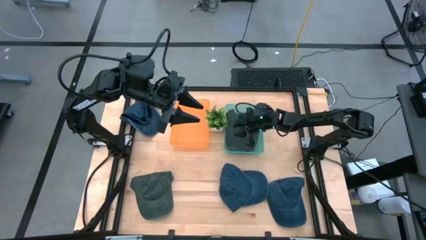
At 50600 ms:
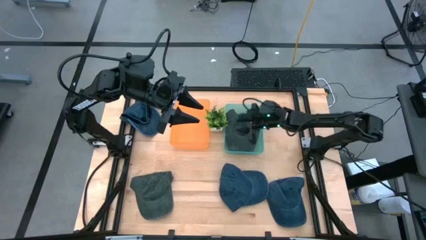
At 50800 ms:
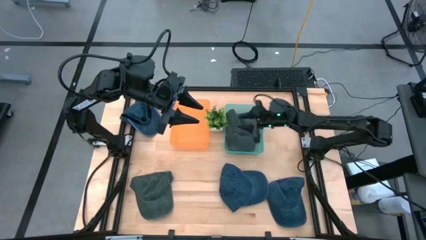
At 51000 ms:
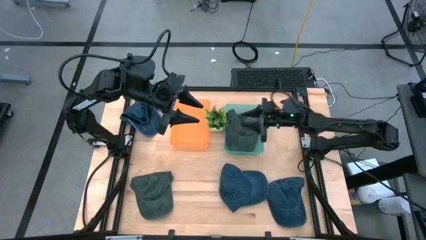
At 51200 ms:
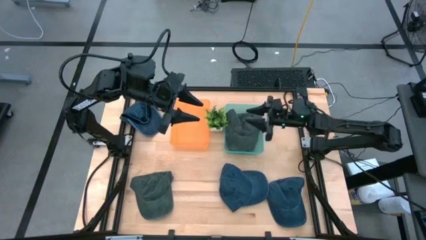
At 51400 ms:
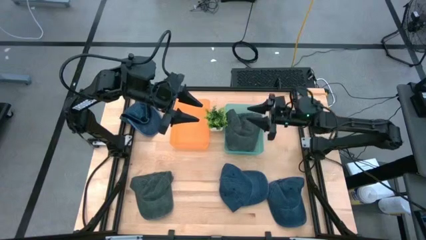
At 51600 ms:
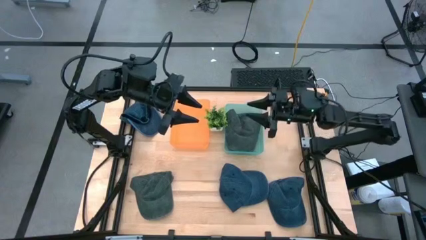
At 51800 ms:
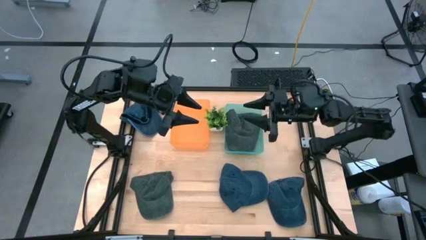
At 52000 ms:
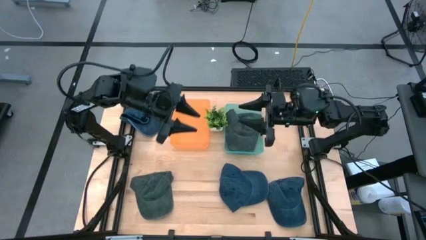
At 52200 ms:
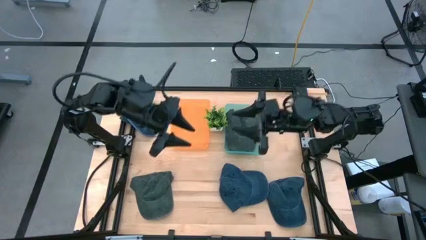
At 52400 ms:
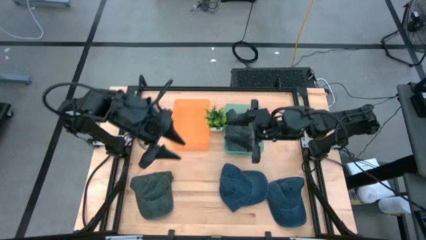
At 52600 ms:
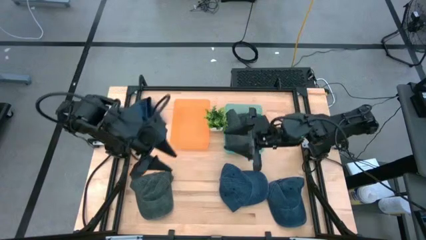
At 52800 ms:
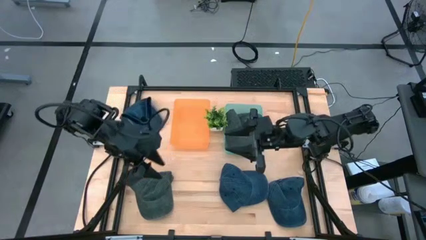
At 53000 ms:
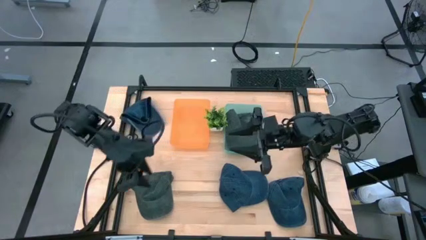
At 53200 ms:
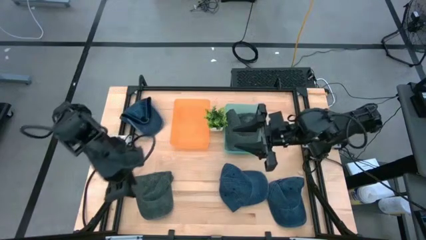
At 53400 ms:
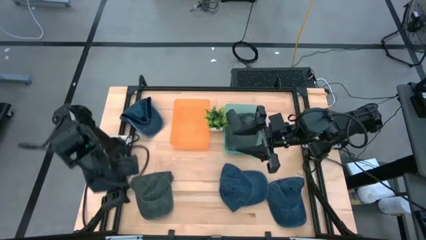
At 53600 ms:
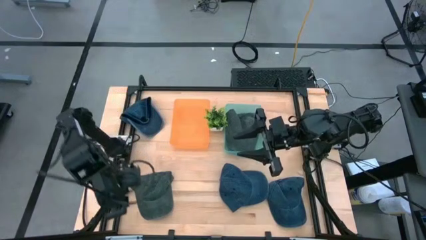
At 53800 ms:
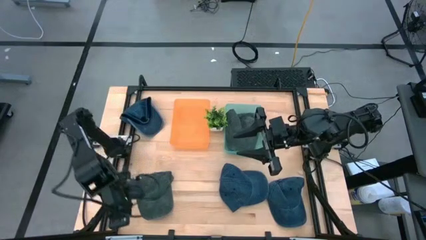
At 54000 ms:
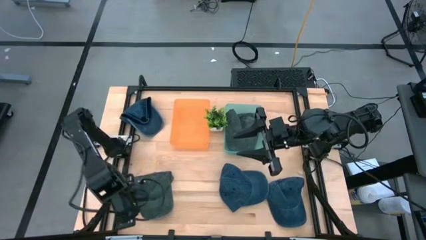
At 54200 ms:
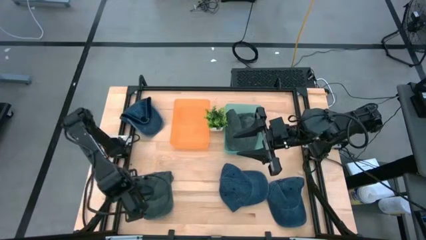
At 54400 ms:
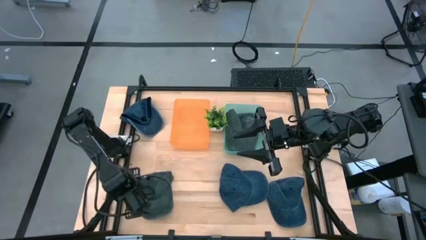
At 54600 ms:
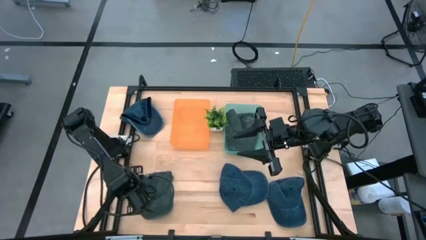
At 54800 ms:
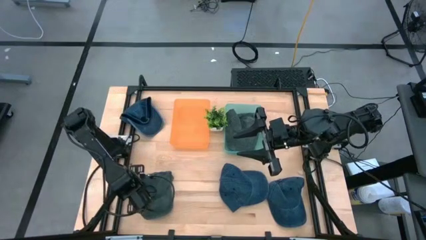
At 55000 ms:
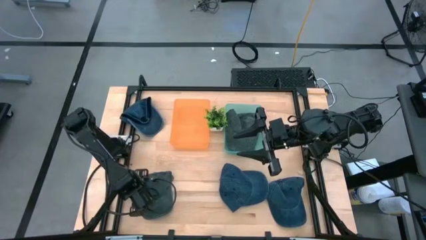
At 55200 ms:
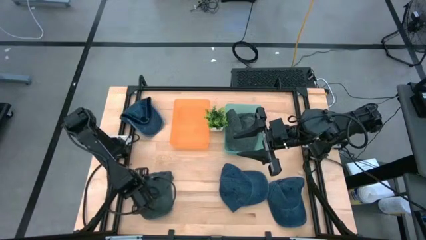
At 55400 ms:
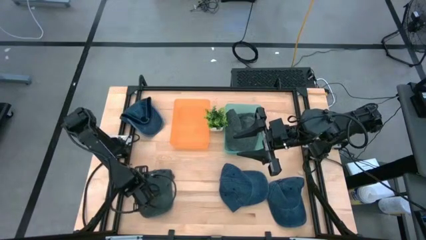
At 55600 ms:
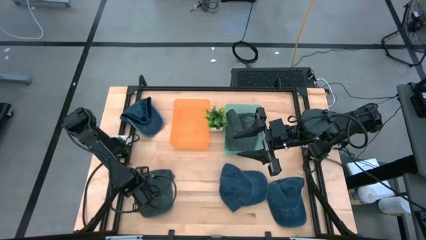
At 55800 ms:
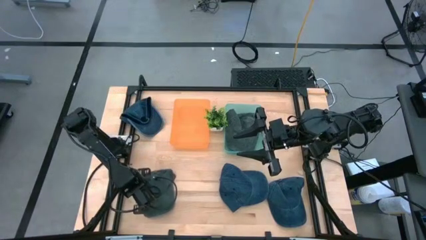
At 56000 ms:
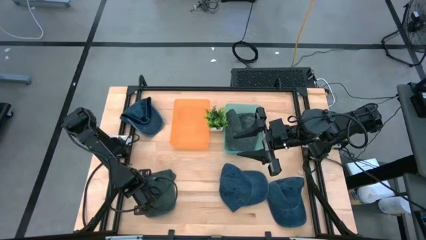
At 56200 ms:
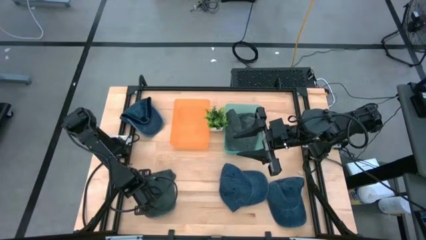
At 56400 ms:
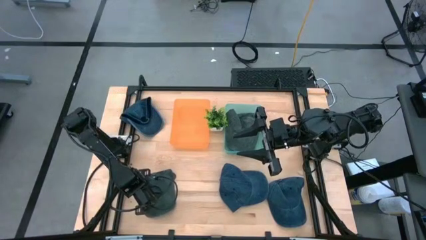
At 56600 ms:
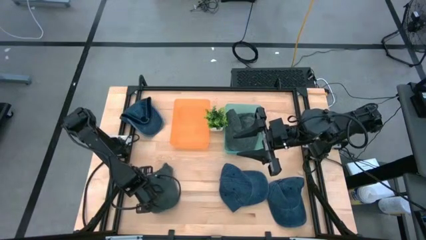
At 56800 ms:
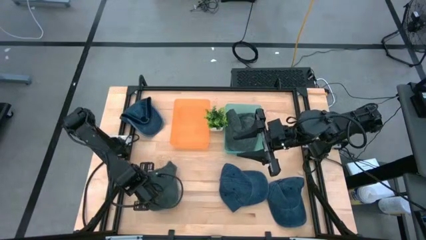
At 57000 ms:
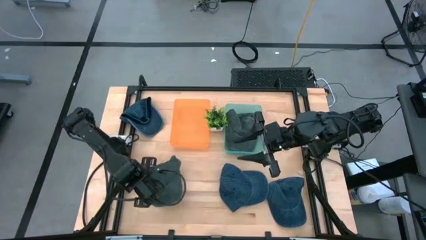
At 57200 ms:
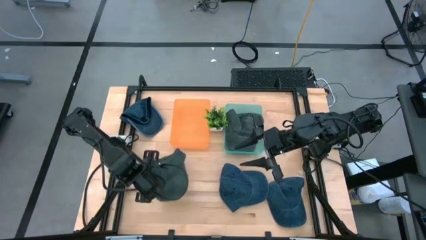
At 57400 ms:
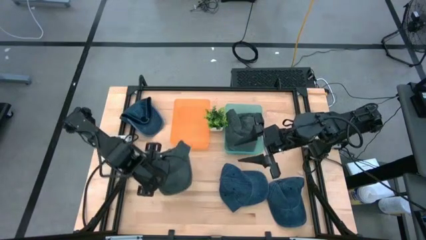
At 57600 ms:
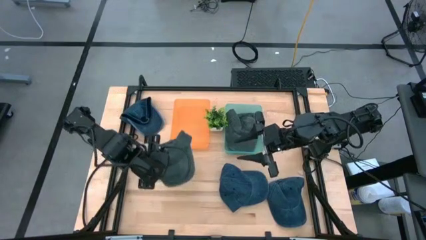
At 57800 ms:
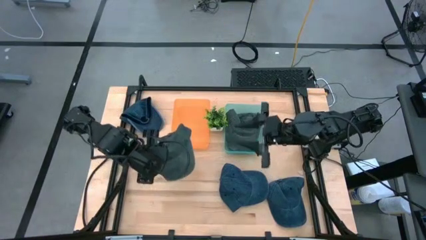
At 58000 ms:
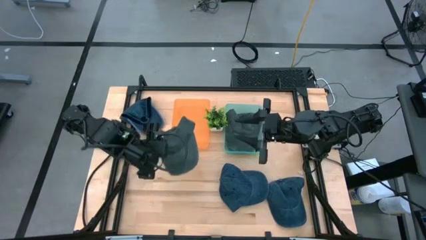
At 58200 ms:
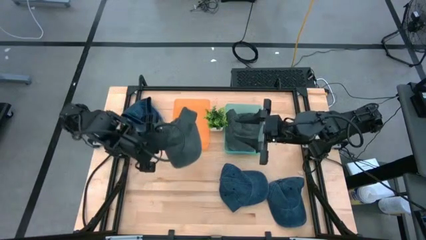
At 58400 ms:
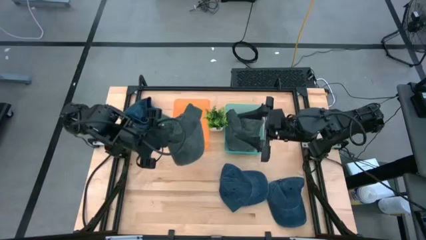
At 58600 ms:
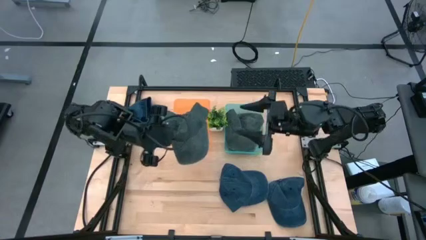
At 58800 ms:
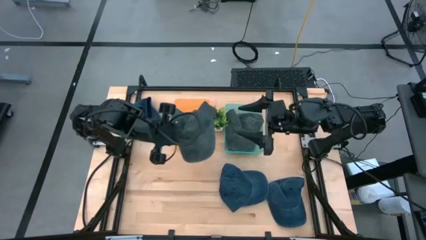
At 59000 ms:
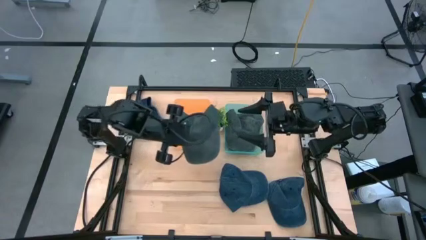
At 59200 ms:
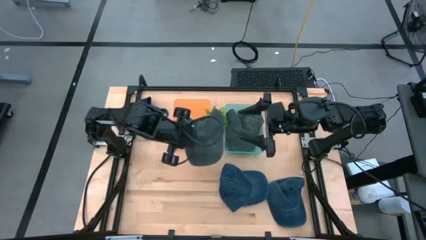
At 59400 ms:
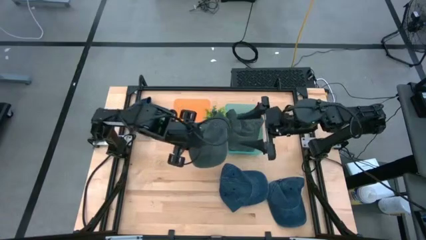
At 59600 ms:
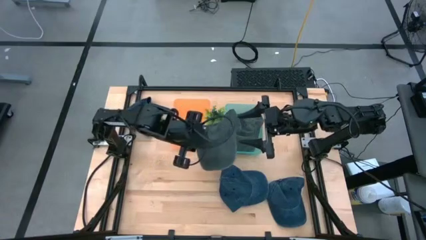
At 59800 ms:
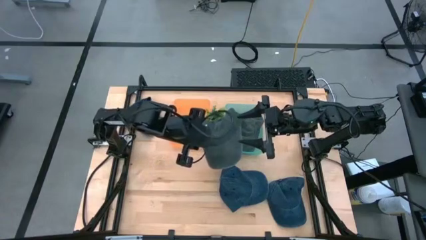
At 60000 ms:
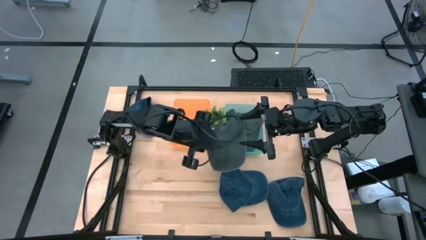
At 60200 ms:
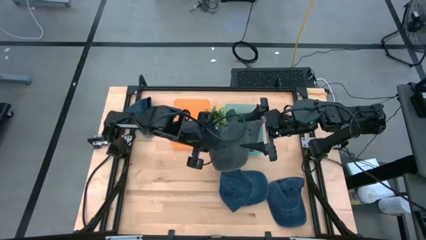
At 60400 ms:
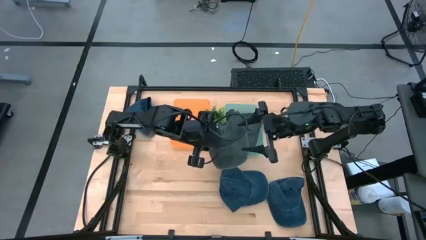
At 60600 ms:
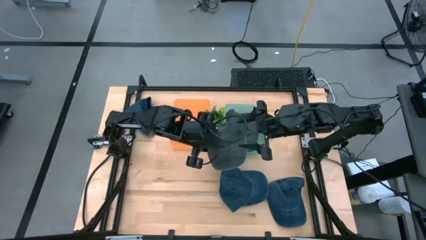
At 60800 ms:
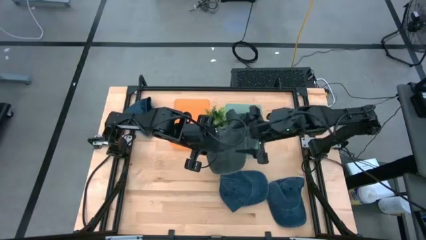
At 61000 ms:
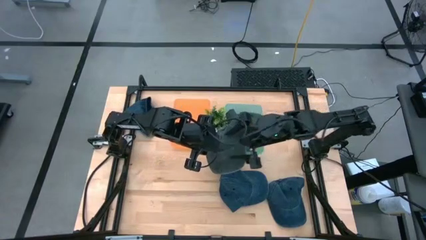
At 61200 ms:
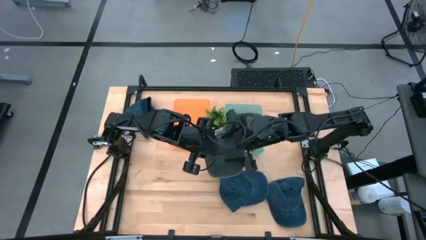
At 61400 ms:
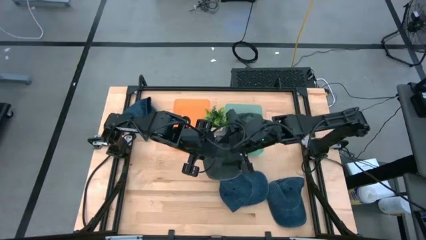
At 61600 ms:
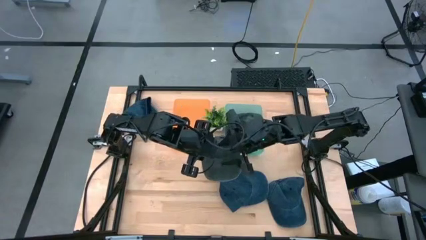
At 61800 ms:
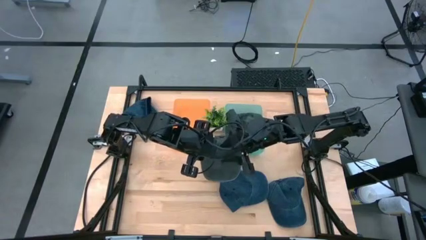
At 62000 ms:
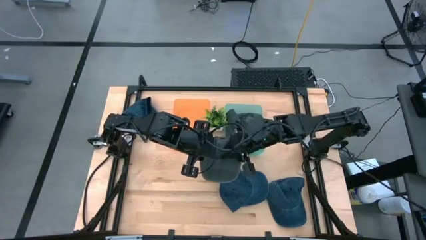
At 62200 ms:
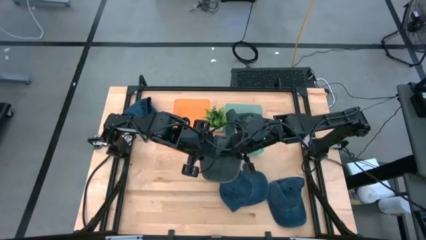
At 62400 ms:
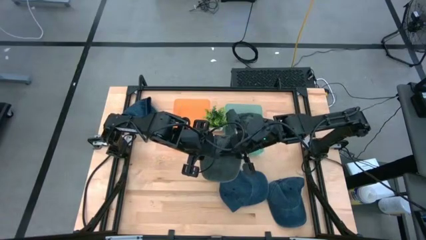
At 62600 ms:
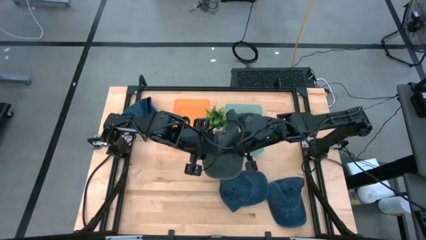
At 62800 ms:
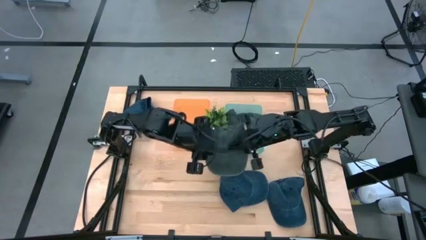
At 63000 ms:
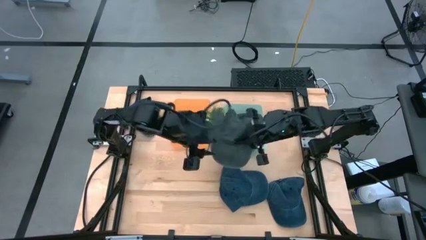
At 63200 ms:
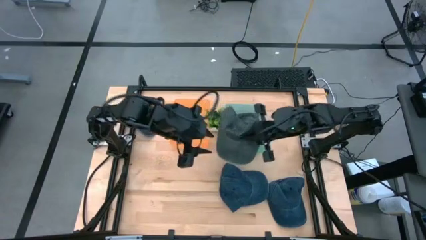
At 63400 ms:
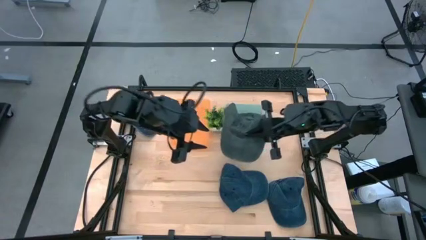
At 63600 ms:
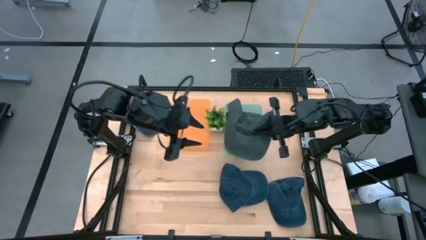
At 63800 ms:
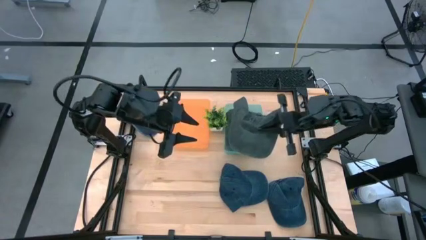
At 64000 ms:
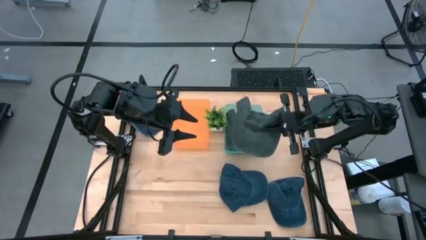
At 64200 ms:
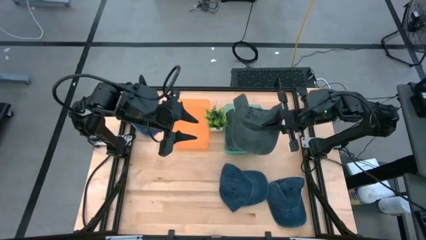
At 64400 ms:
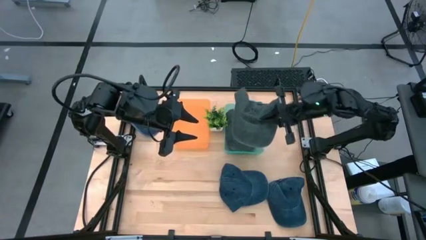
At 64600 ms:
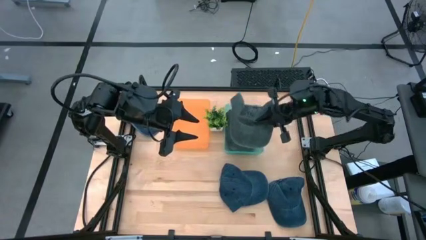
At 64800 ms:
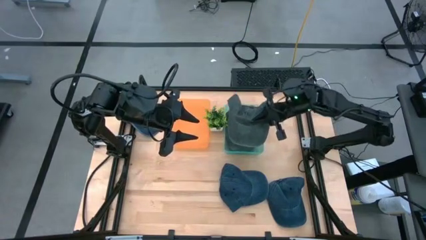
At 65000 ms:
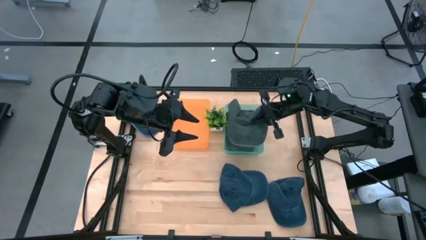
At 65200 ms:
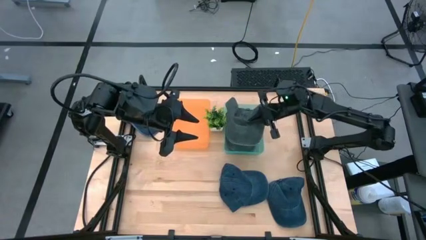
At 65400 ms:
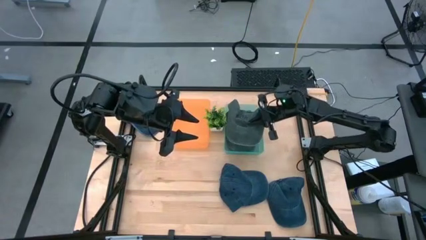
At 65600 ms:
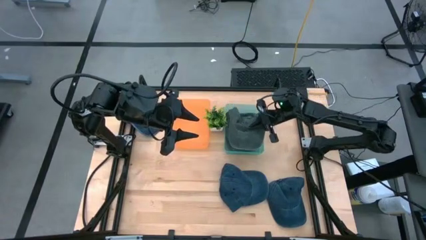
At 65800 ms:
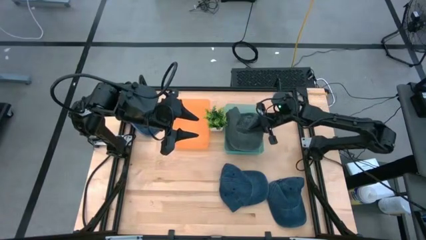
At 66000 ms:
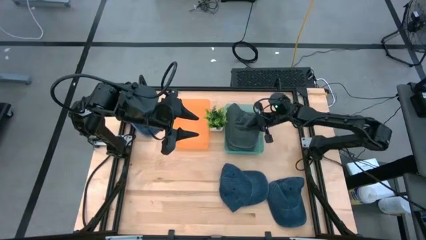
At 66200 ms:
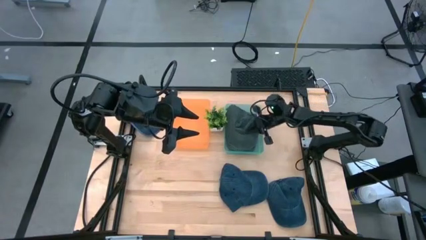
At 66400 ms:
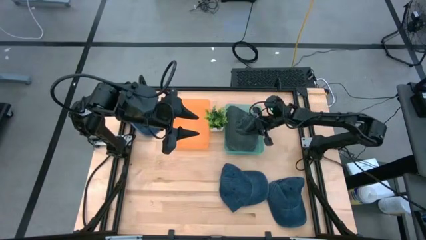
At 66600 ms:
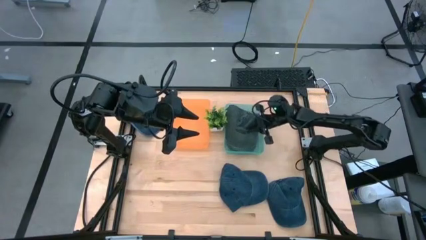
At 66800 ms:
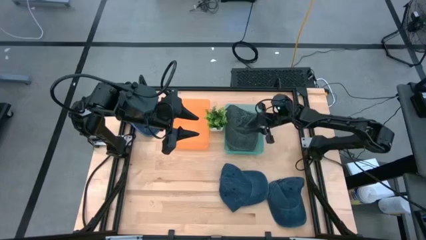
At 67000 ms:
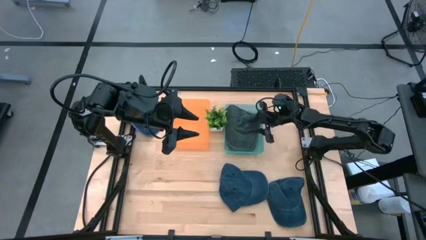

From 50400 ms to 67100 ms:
Task: Pick & Place hat
Put the gray cap into the green bin
